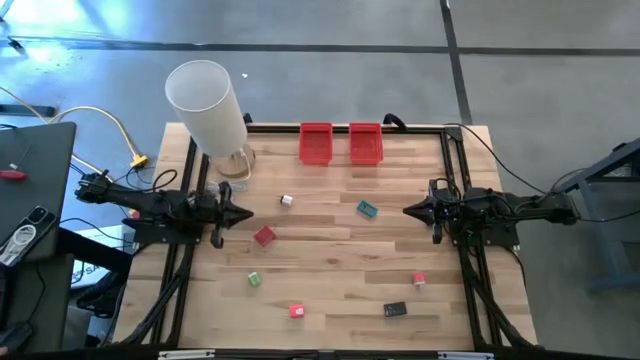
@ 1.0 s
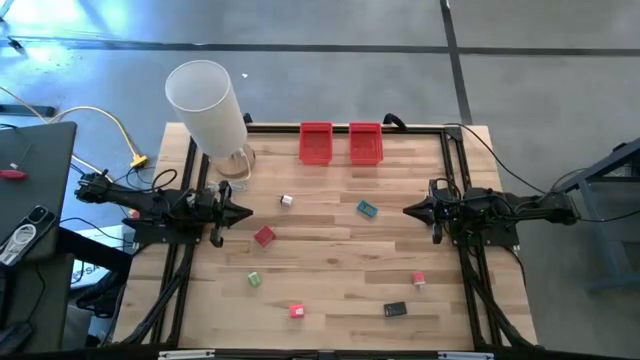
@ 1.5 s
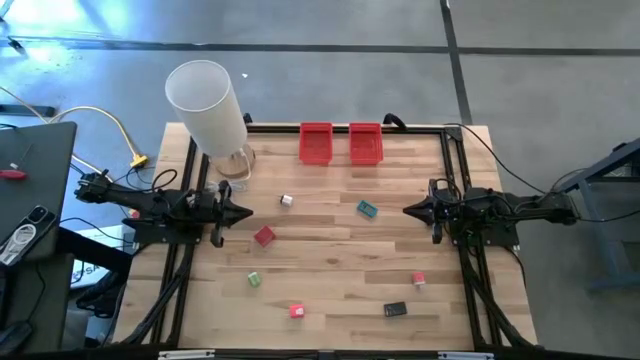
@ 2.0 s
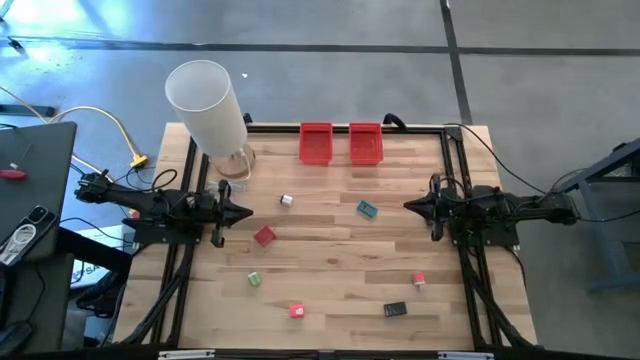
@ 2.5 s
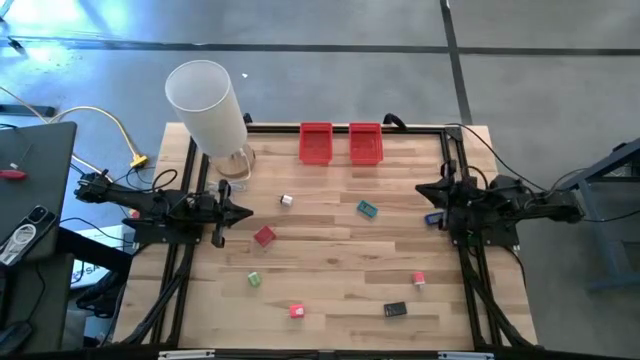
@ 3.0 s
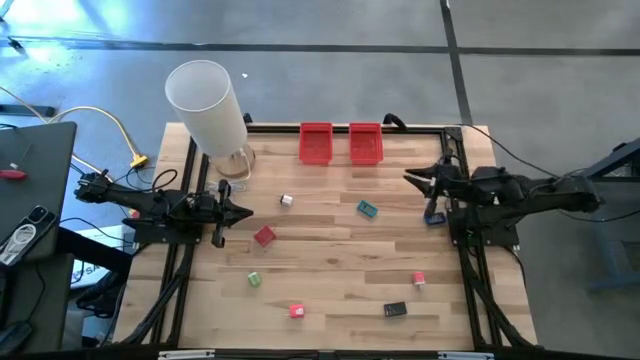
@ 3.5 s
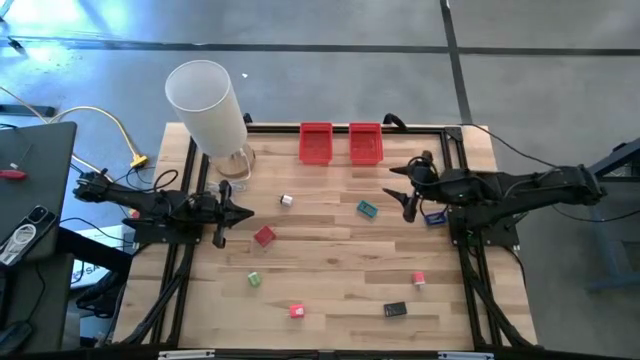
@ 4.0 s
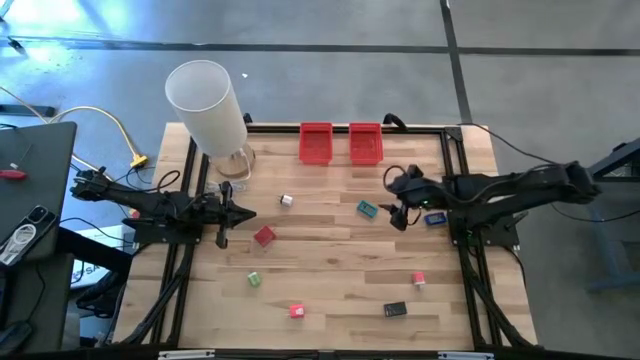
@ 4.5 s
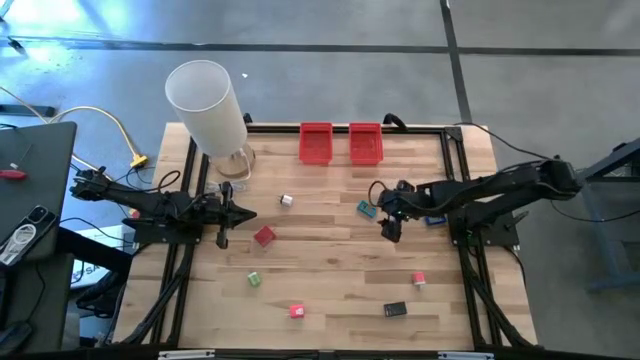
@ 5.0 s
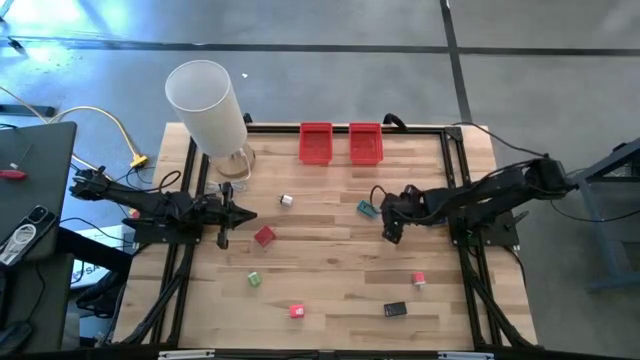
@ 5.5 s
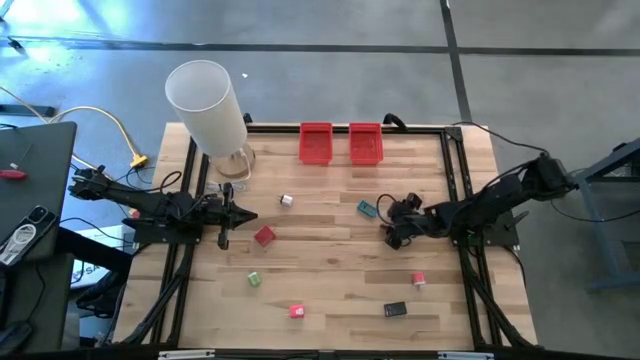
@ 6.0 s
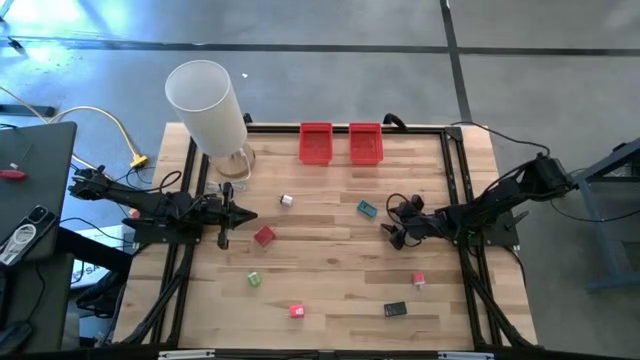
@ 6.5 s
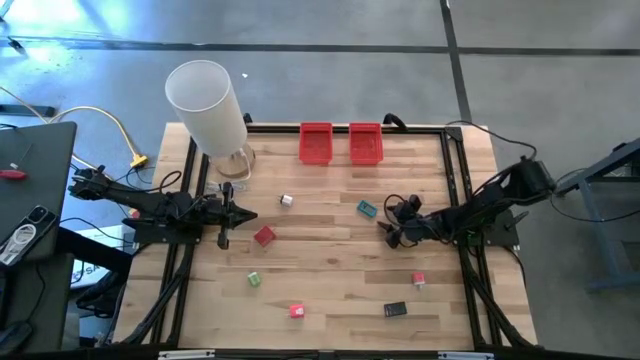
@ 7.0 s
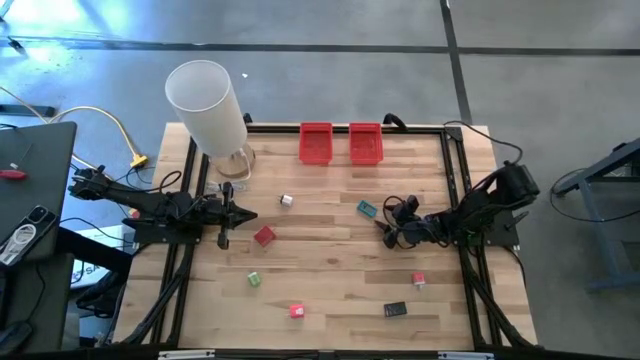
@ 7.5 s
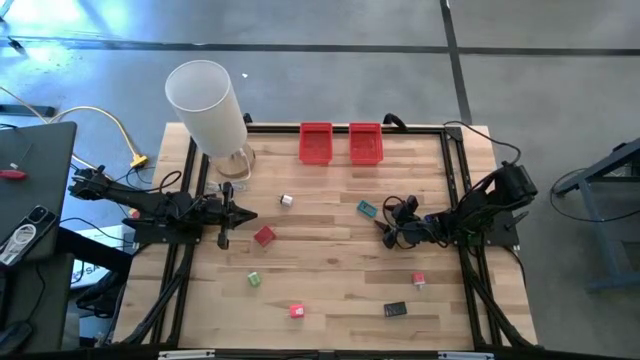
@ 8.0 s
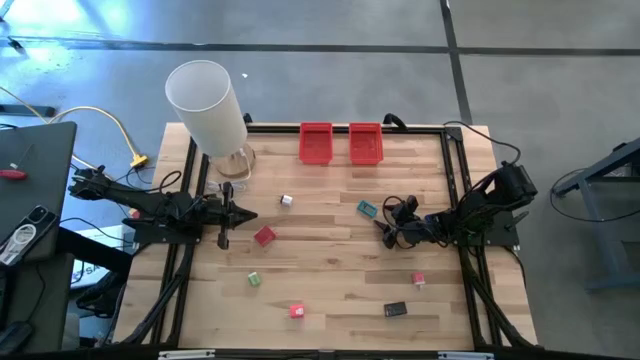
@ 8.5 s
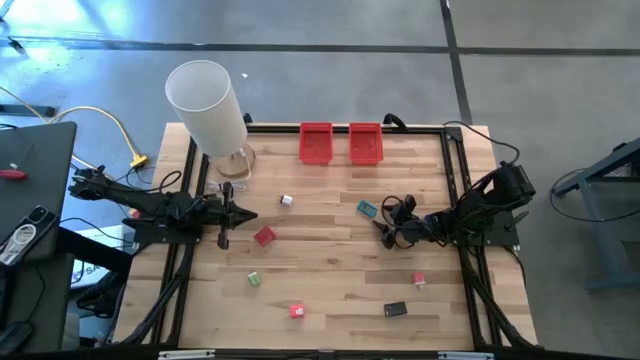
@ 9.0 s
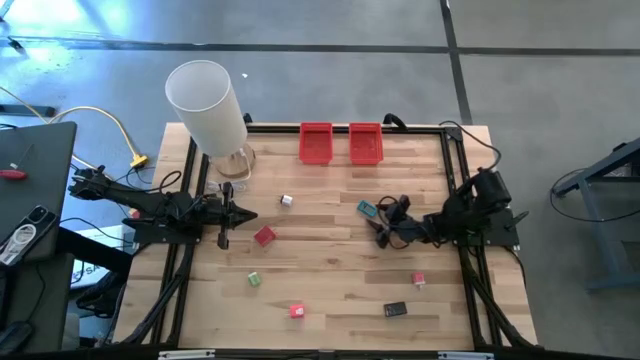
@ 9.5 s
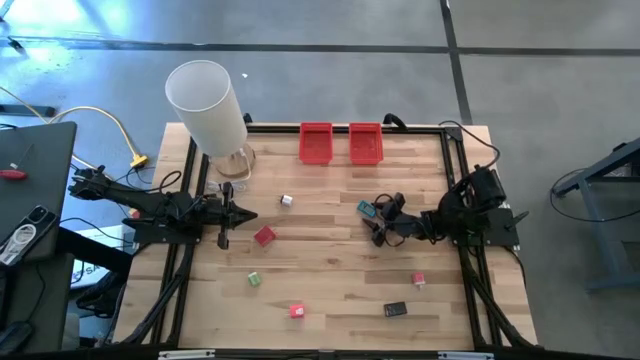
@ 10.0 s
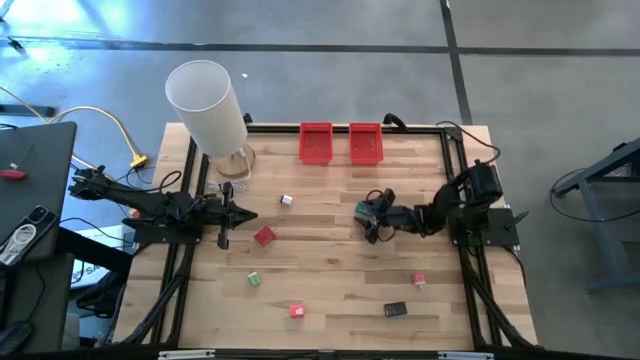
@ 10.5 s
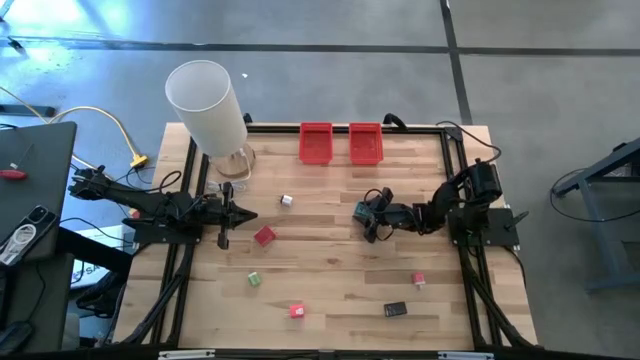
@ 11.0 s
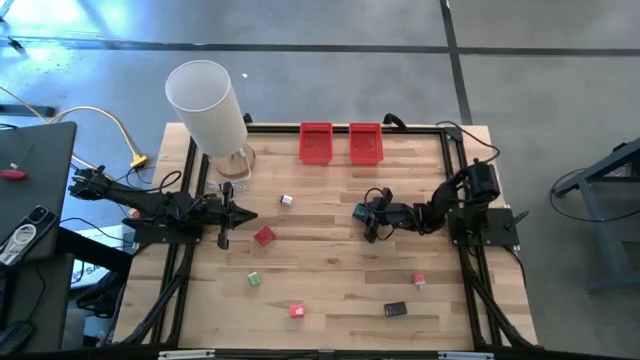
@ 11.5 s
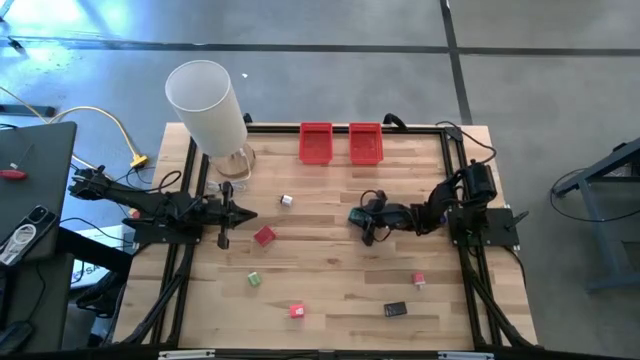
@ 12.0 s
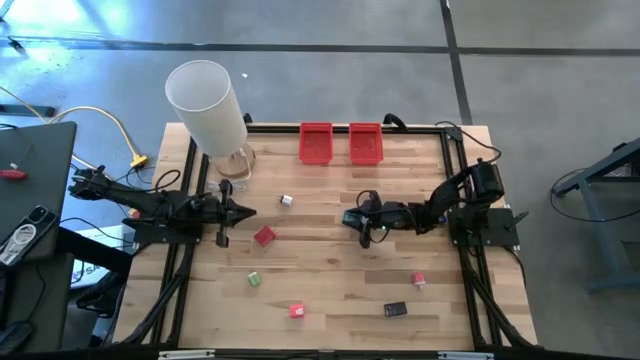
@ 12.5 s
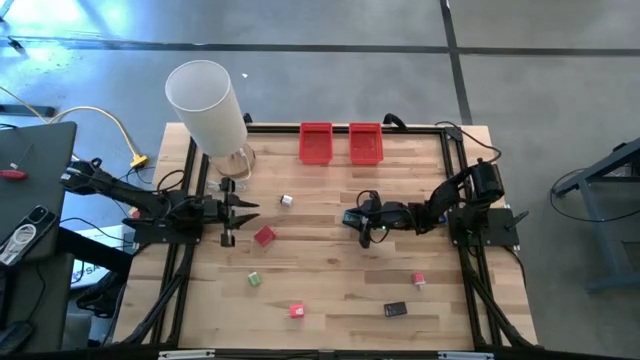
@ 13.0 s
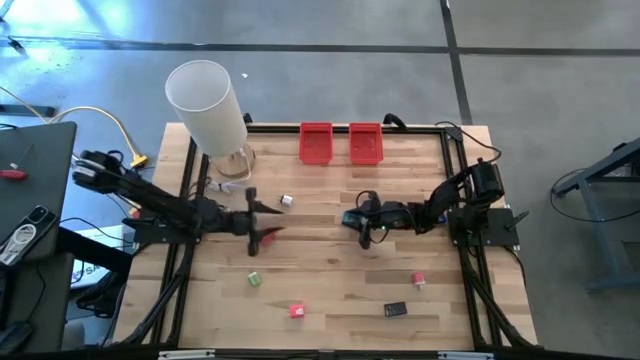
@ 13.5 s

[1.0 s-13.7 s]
Task: Pick & Place Office items
Put the light blue timer into the left red bin
